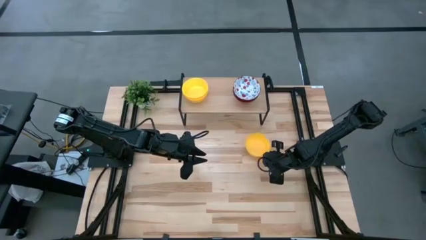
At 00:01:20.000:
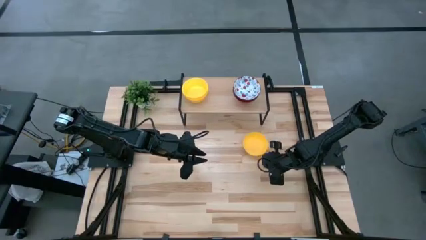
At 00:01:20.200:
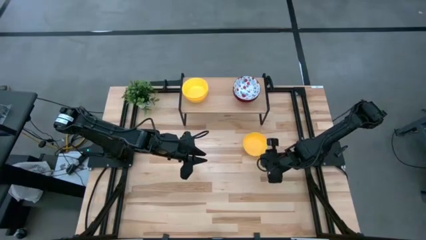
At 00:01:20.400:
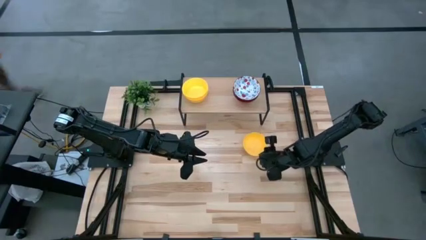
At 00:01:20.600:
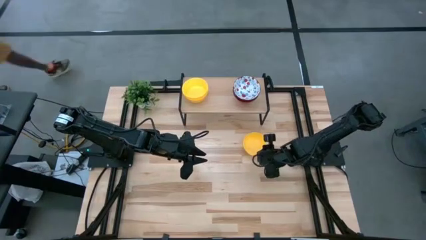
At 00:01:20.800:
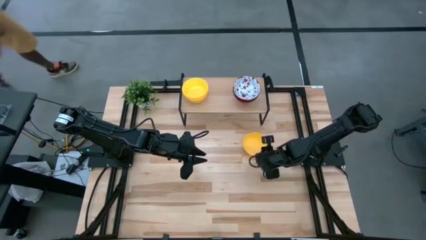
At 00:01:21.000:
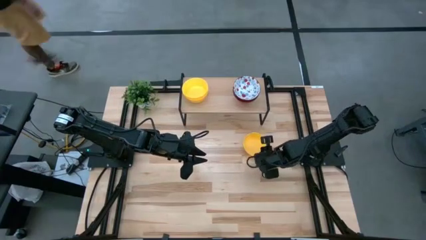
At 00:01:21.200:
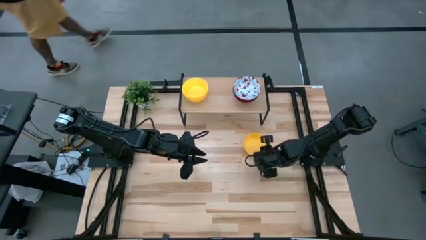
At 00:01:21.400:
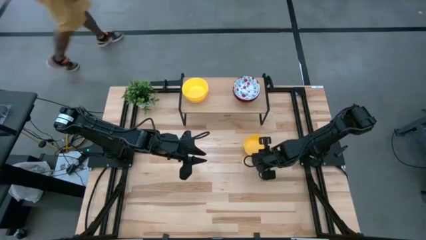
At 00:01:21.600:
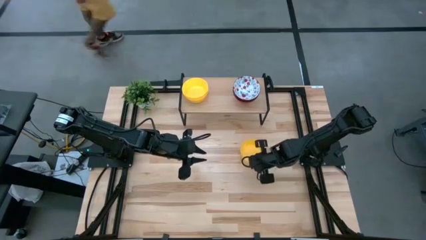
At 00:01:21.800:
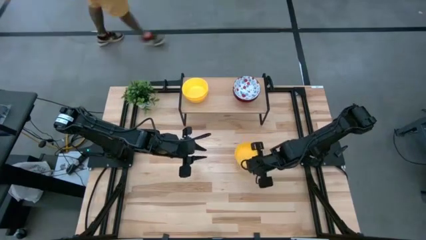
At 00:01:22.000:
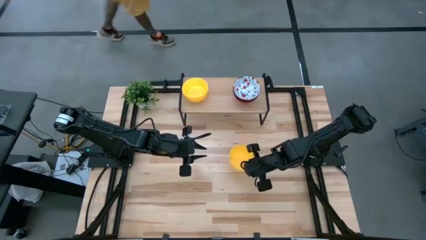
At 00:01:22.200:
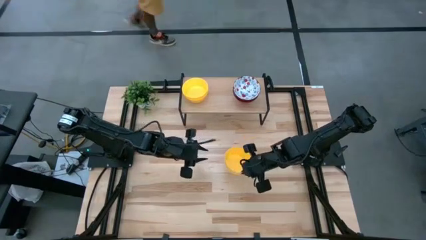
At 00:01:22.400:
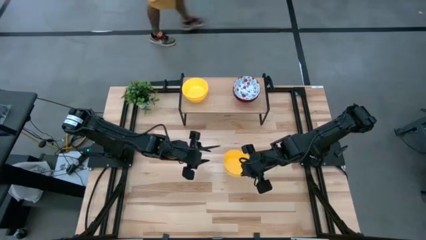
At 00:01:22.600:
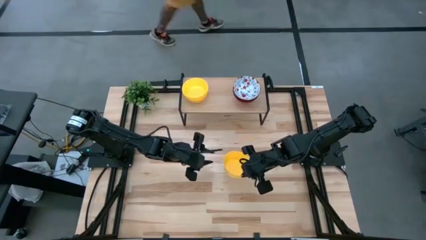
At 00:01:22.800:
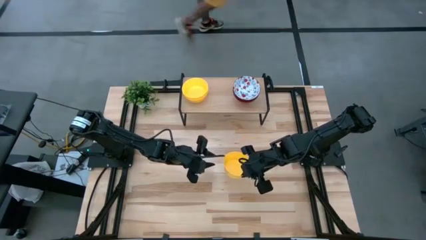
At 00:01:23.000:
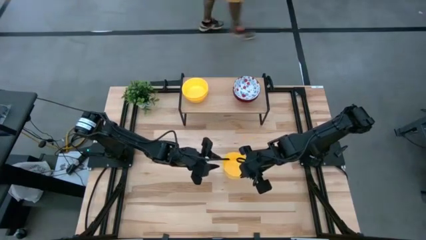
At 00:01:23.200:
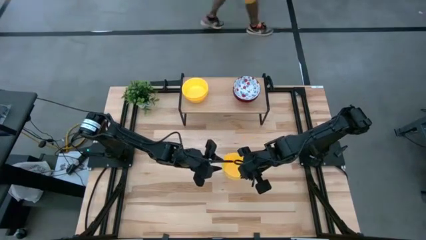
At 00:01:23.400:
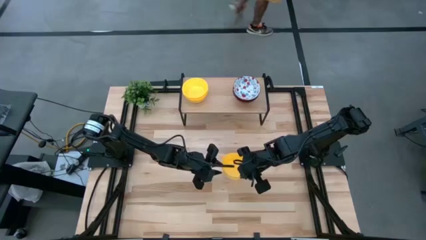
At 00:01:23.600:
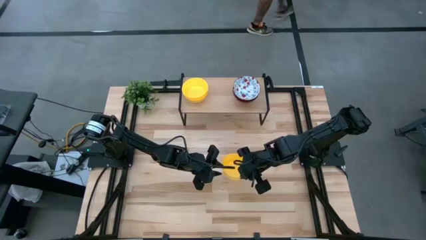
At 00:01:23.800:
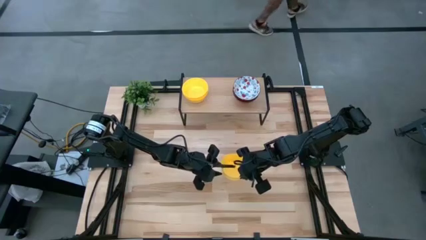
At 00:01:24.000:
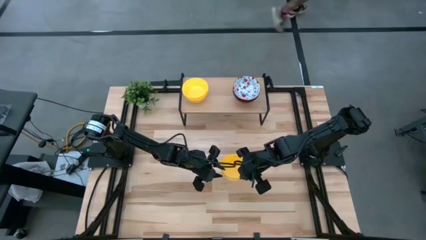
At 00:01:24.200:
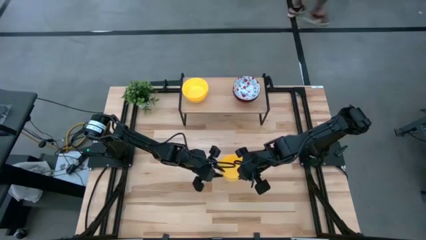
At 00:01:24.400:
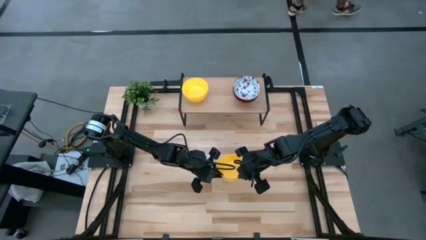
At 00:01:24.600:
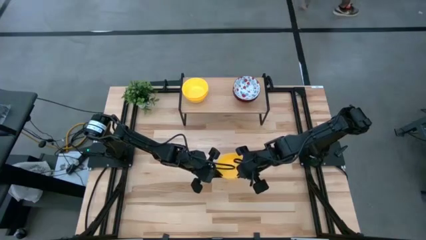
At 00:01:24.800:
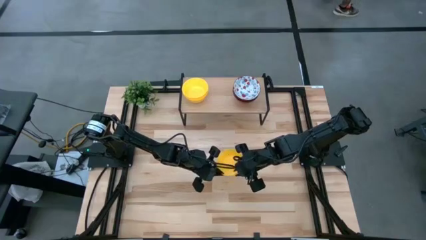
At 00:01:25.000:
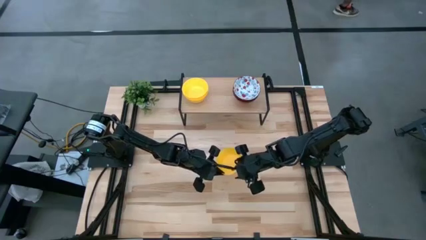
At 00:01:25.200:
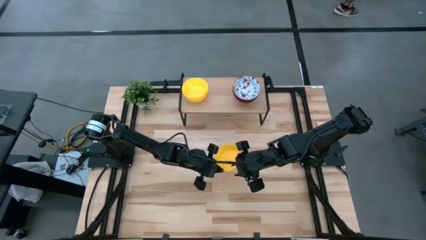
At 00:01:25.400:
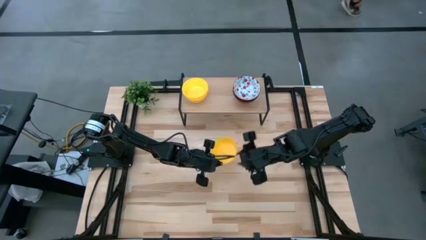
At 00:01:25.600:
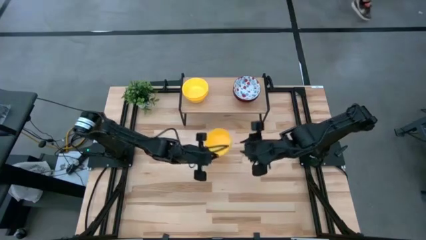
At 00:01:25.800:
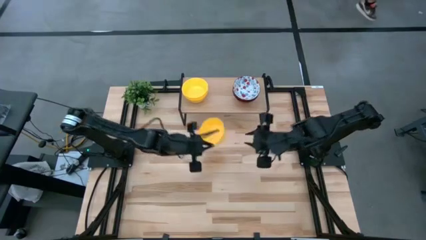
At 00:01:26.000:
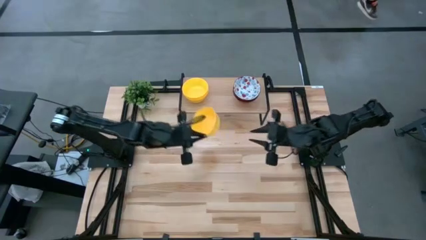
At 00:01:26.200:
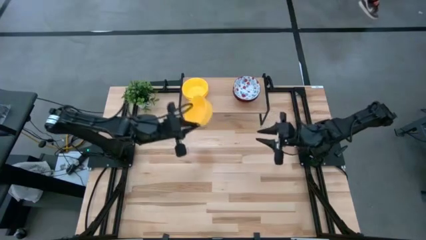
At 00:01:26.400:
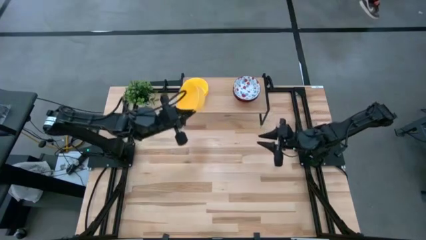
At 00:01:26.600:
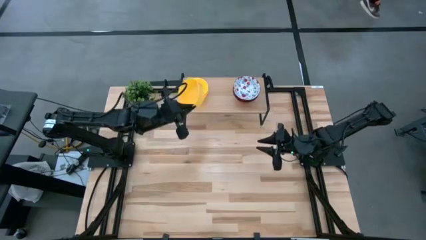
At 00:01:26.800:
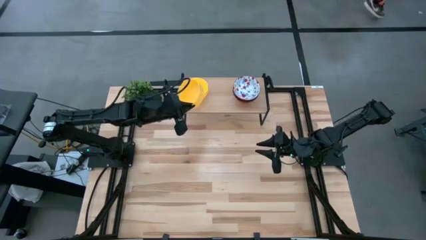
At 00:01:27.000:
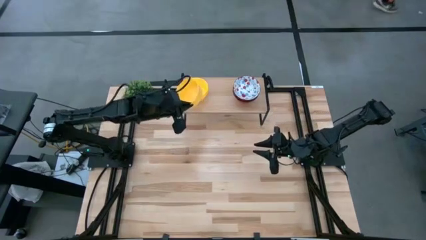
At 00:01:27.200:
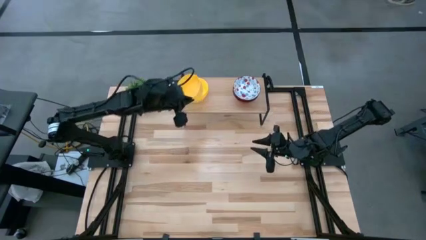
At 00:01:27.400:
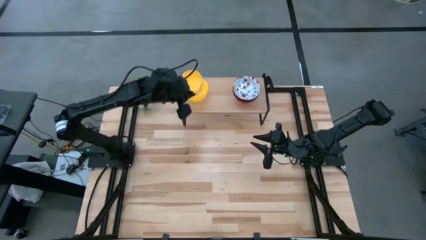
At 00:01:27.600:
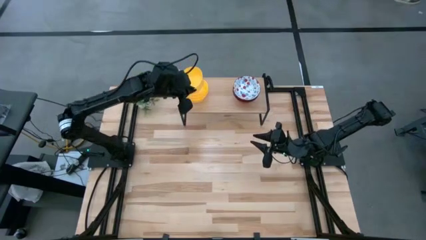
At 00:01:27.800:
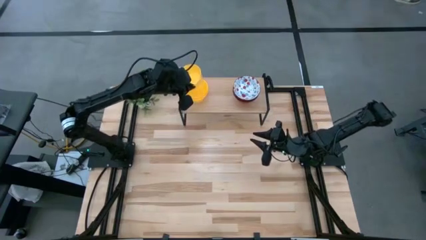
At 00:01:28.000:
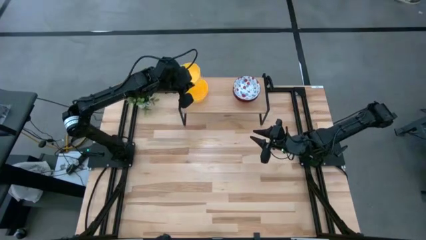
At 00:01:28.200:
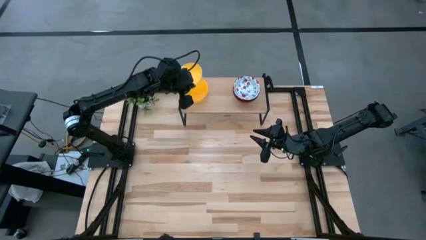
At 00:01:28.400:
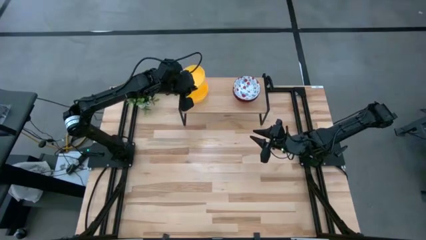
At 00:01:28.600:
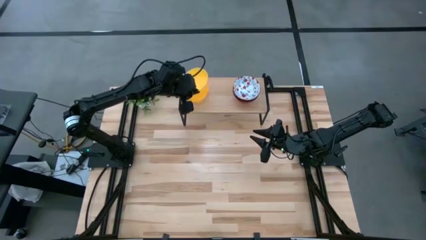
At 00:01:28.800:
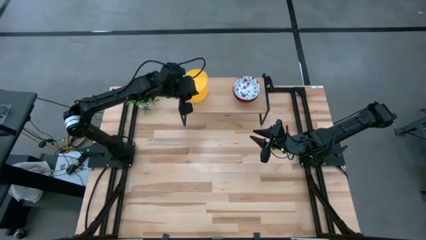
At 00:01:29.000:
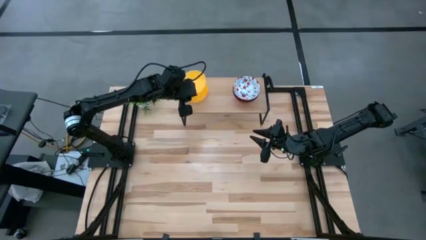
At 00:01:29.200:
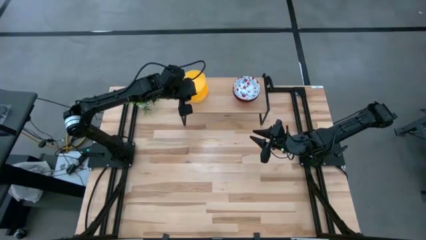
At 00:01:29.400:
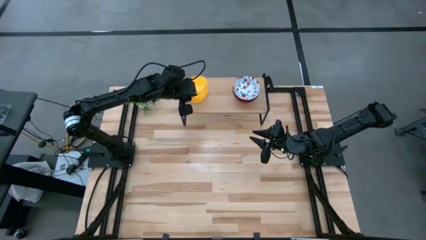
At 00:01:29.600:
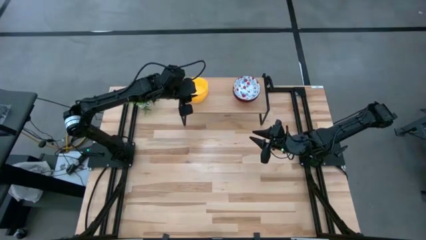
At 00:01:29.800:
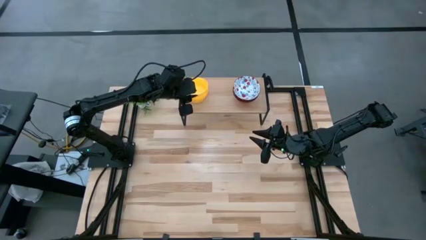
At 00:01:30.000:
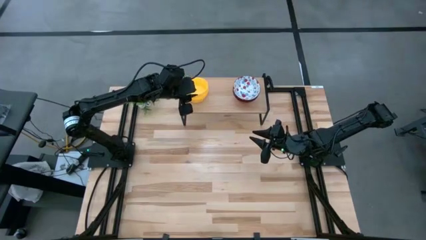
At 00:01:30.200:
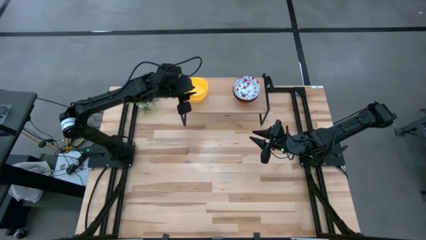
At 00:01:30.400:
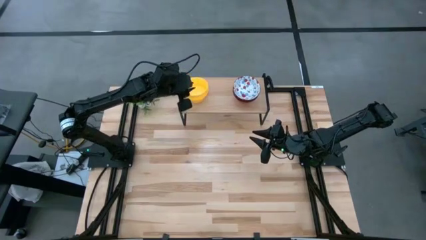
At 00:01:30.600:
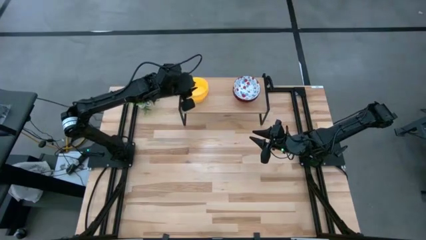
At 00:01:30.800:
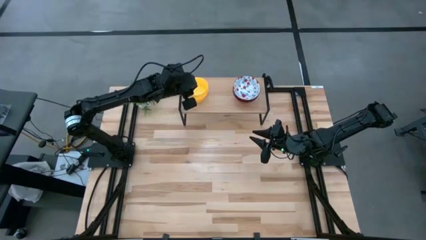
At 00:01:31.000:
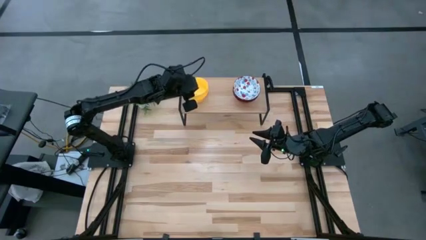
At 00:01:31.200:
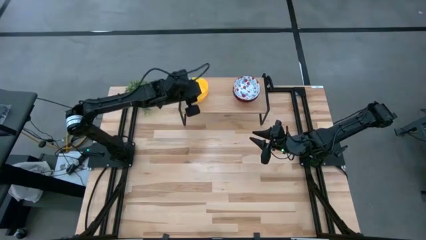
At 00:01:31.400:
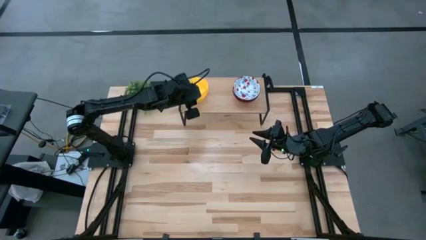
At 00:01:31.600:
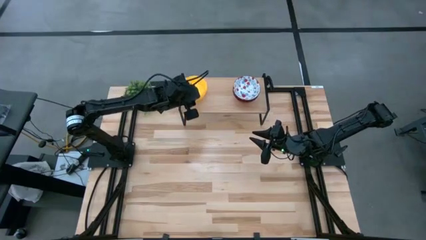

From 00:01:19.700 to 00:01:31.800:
Task: Pick & Place Mini bowls
Stack the yellow bowl on top of the stacked yellow bowls on the shelf

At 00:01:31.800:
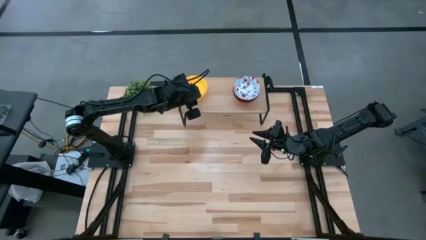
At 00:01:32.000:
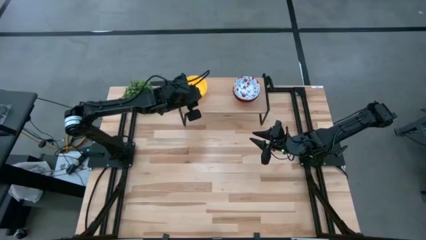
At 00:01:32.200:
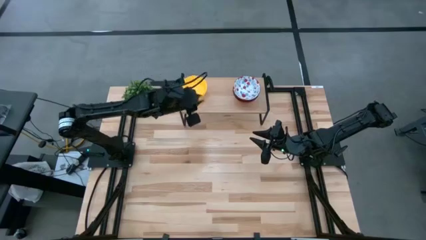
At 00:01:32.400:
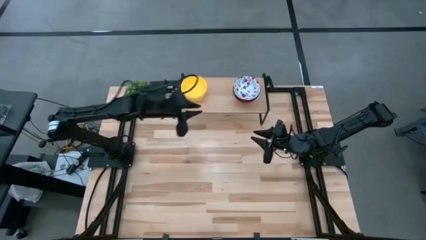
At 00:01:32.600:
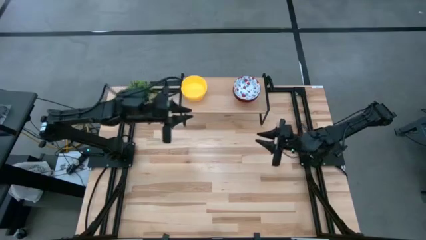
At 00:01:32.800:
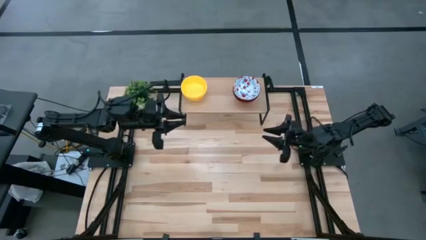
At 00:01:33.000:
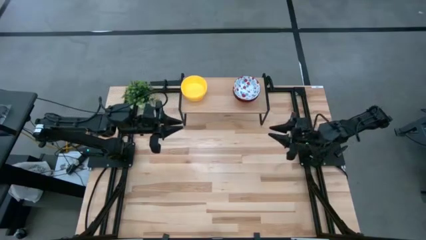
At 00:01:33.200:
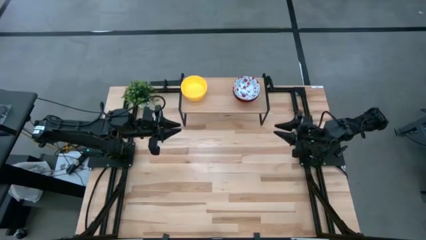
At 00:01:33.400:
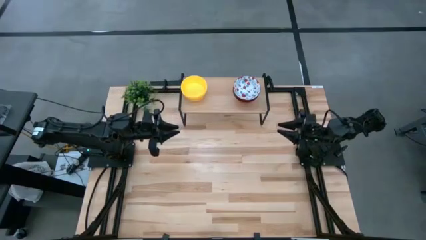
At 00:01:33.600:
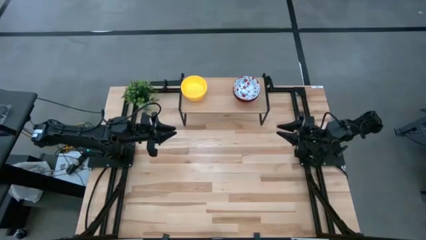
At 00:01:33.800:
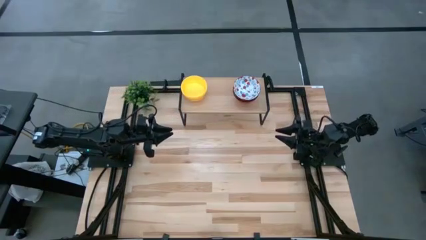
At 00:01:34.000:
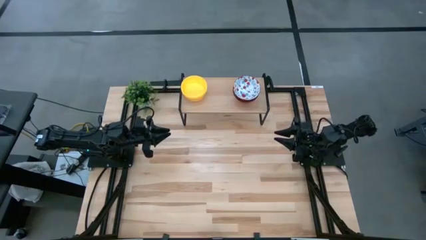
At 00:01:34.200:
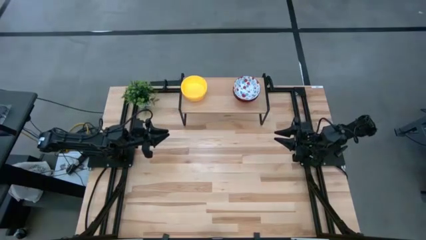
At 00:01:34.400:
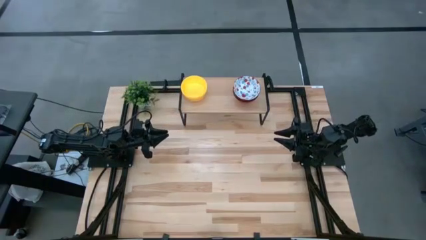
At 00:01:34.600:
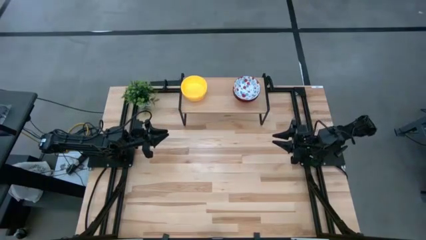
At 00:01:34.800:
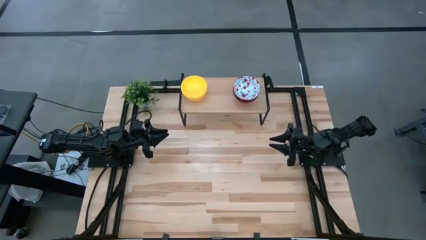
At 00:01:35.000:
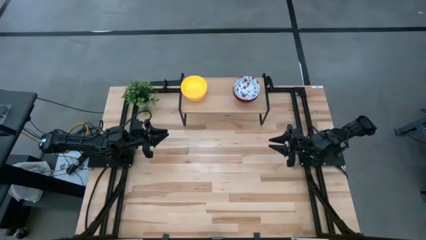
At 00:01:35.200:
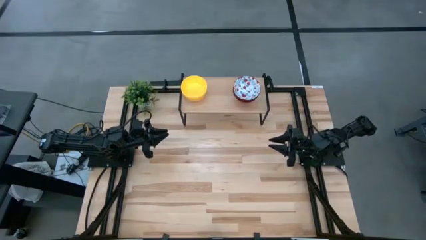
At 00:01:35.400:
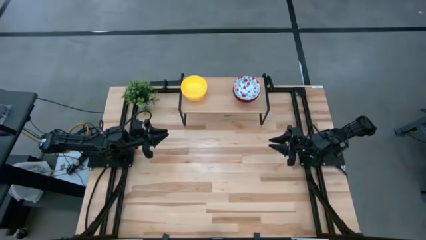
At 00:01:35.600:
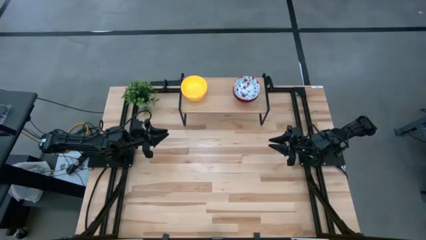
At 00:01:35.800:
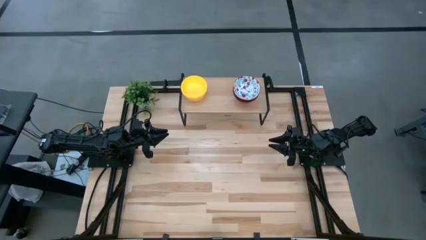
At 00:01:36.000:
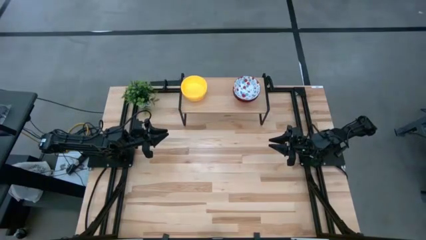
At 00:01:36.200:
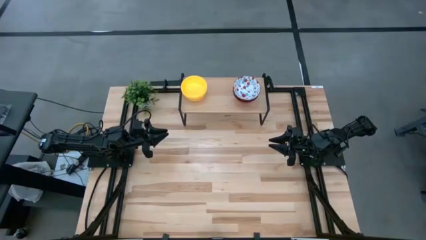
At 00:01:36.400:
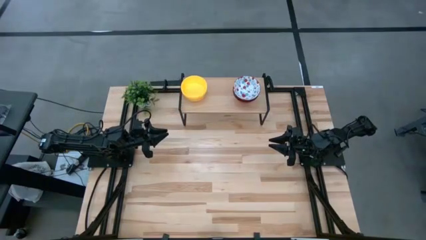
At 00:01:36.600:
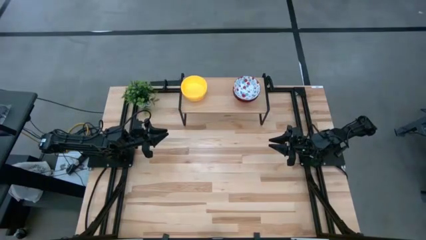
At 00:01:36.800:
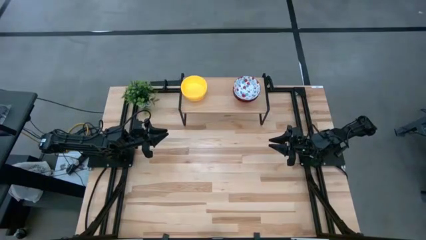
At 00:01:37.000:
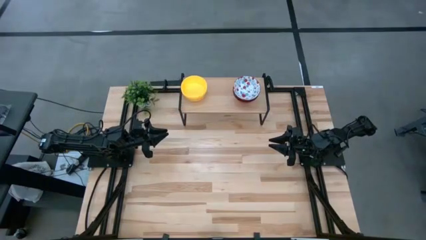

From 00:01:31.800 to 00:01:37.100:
Return to Home Position
